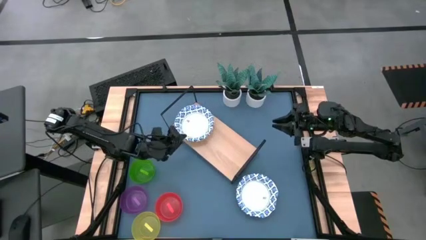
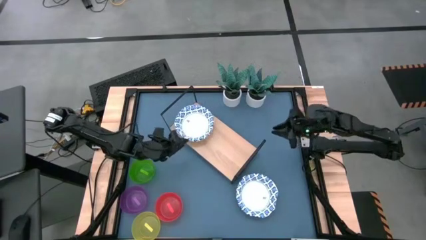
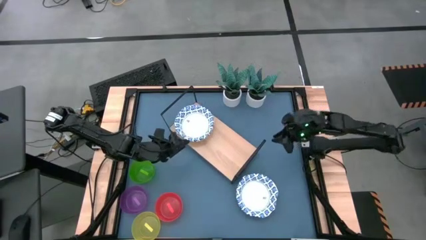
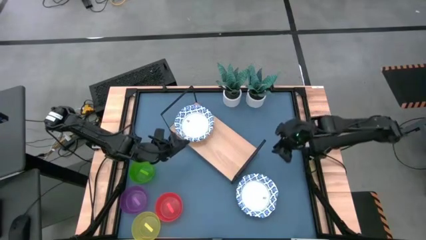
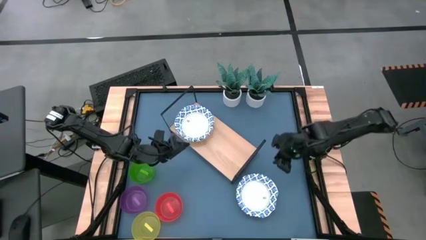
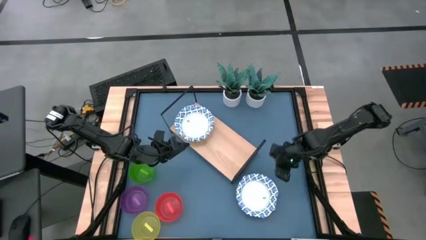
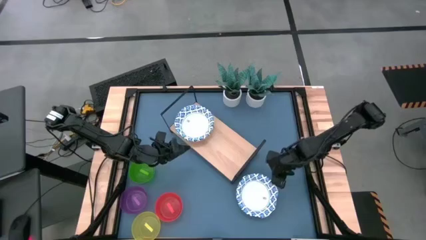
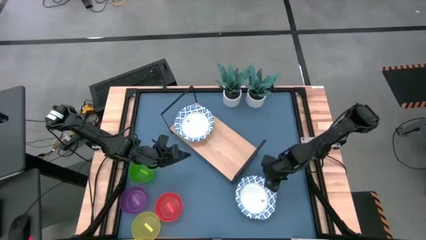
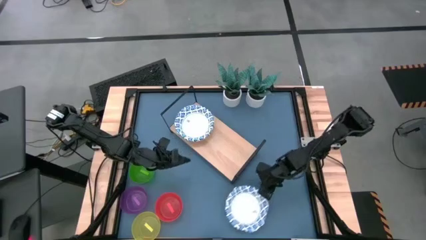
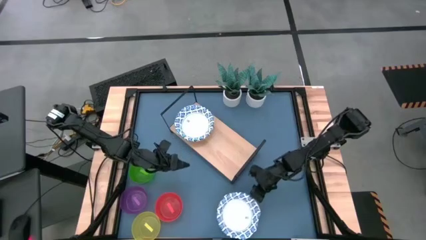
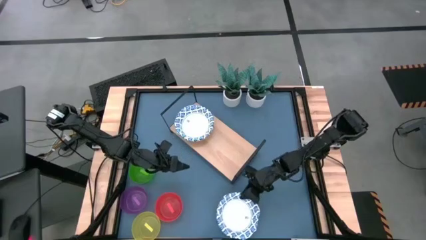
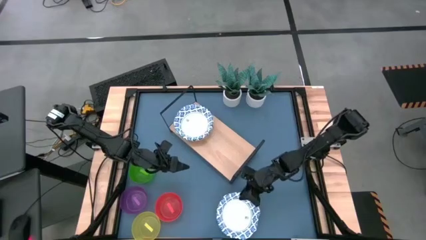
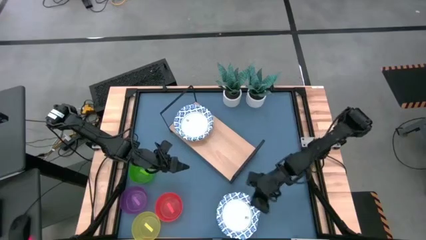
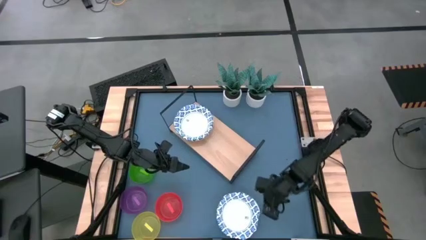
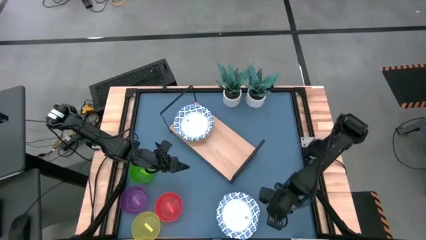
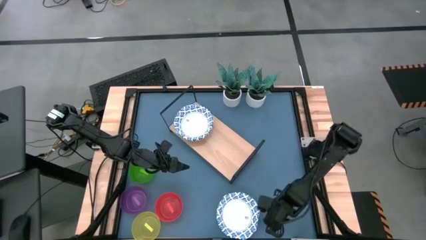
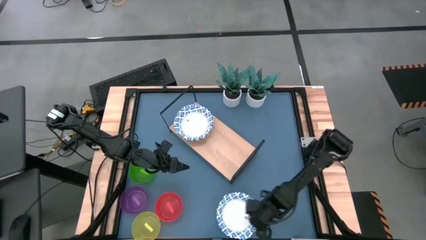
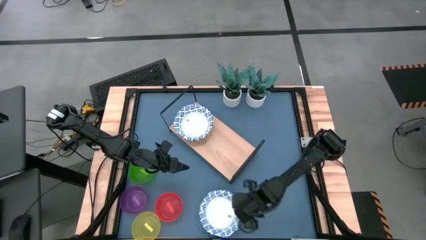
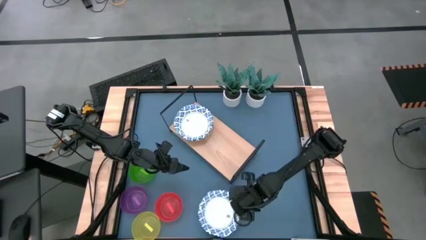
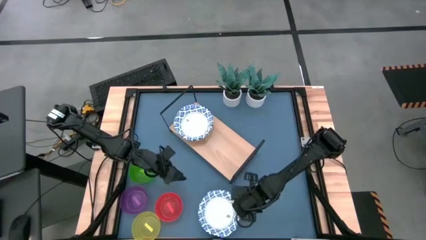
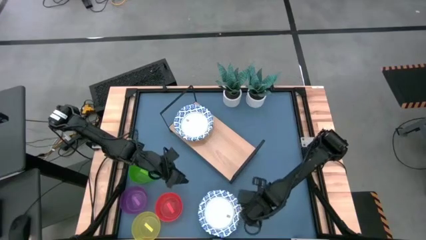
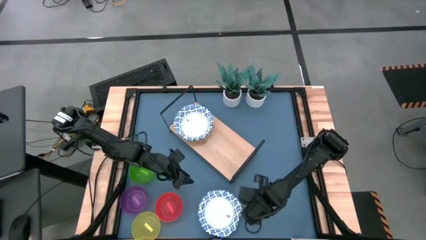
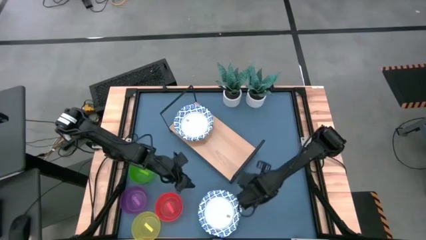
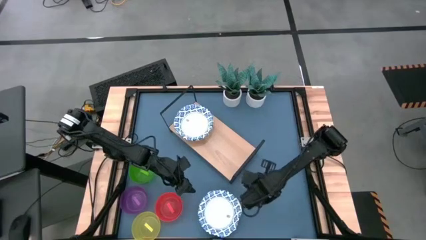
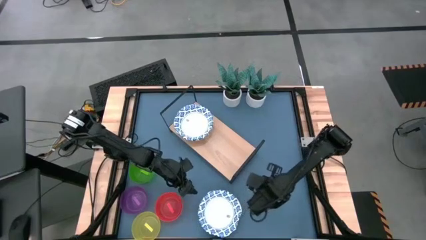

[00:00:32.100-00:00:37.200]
Task: Place and stack bowls onto a shelf
Move the blue bowl to the bottom middle of the table

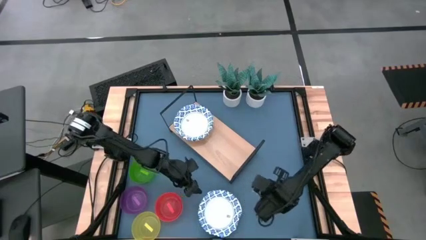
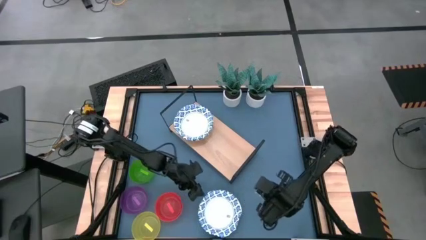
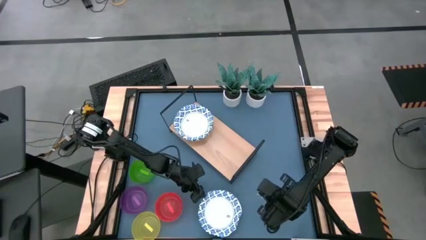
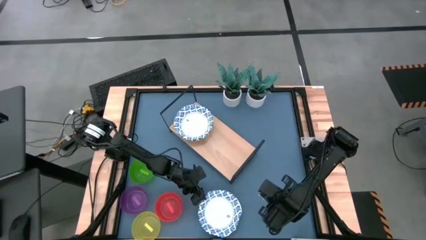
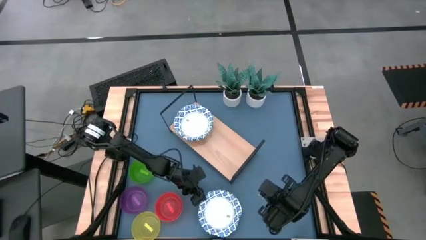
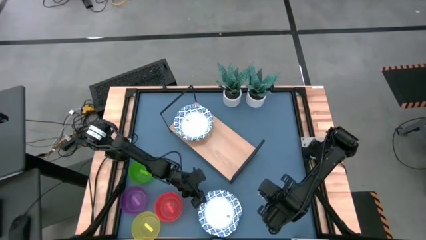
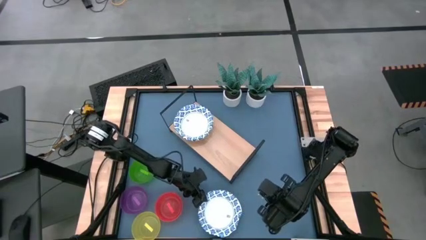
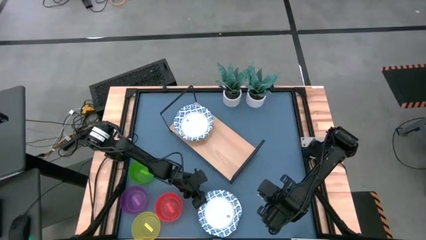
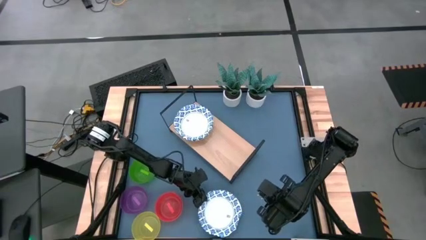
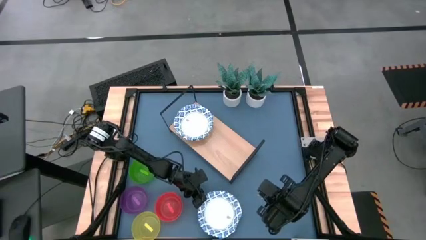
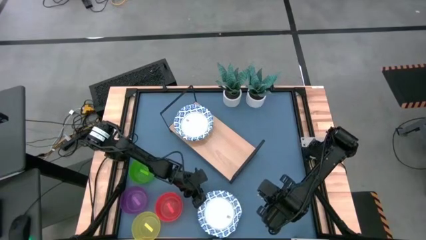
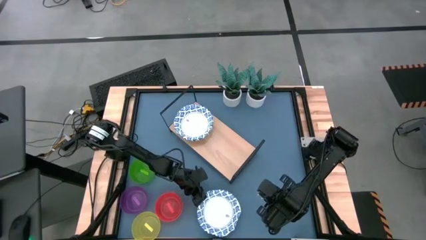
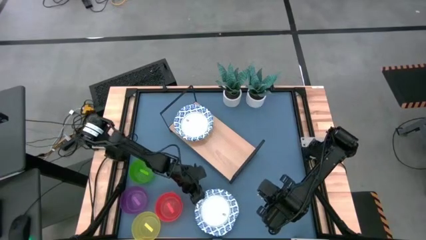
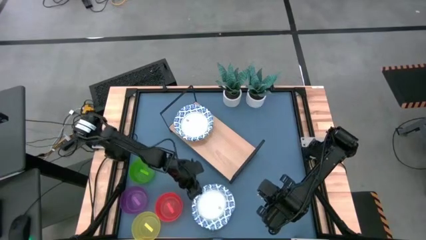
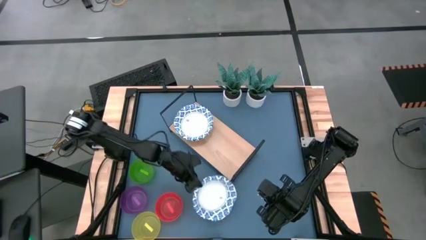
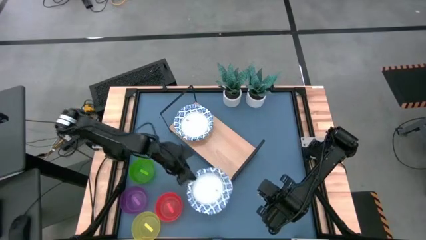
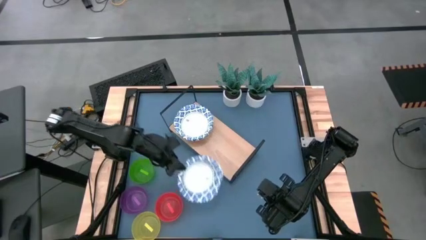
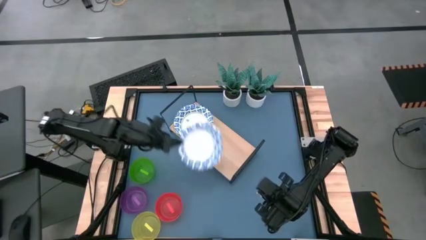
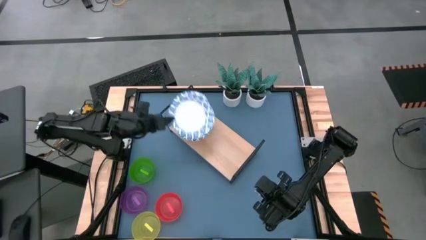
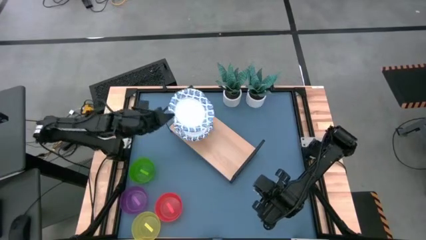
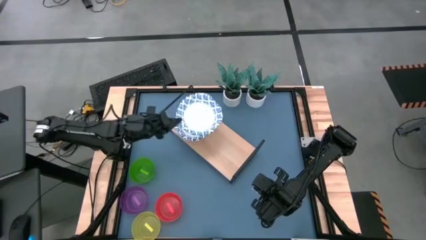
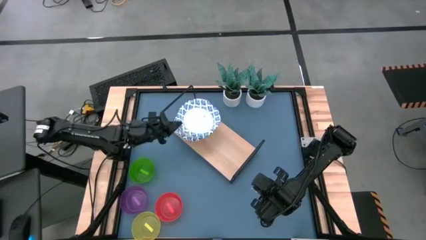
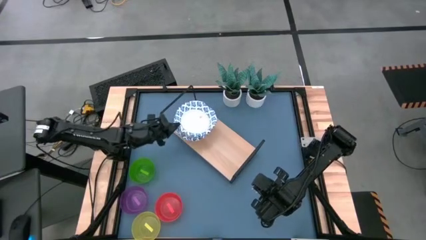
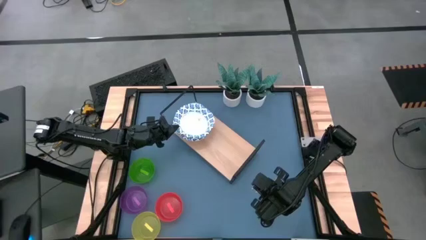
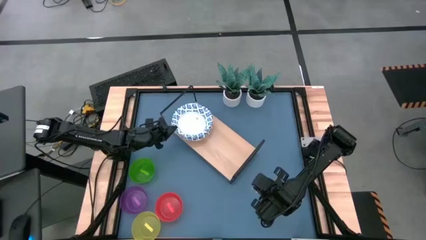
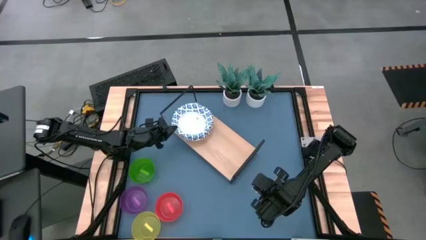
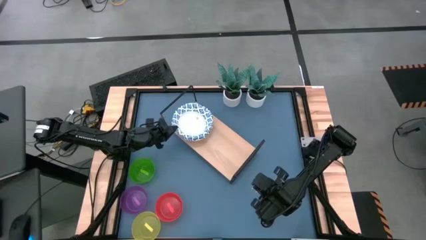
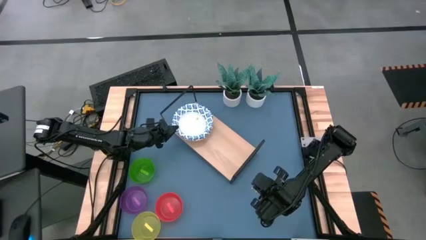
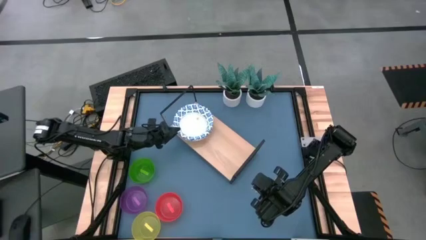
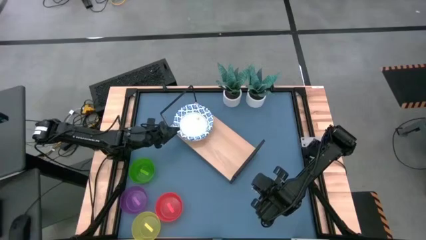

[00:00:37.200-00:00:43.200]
Stack the blue bowl on top of the blue bowl on the shelf

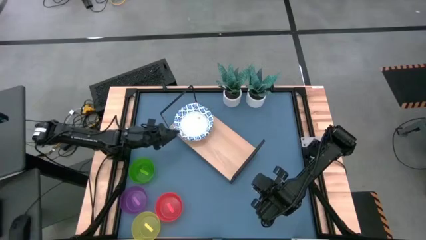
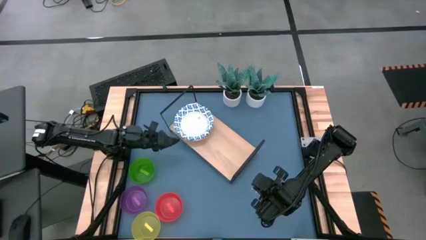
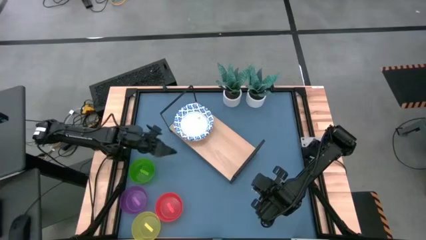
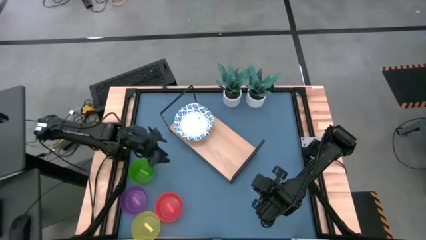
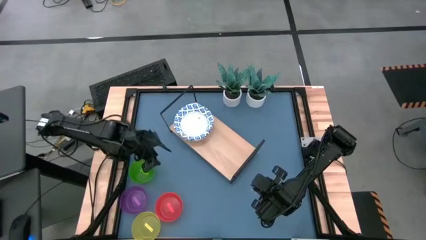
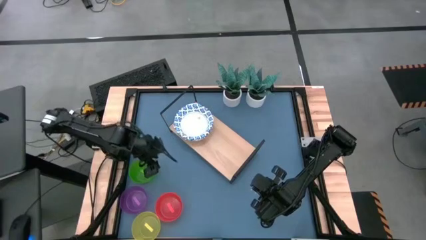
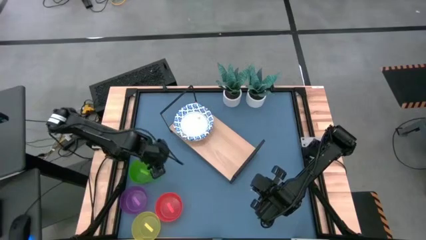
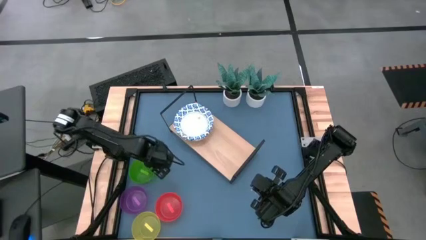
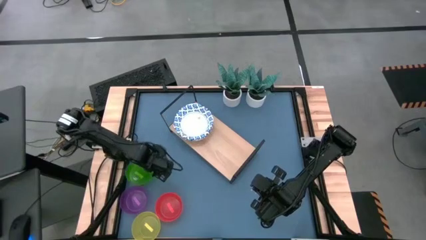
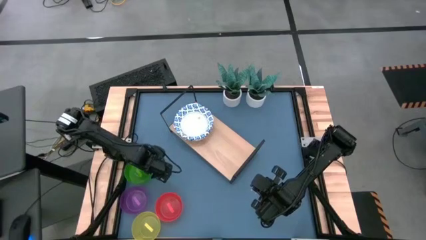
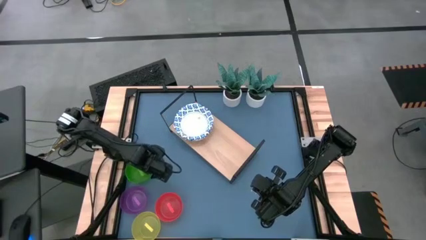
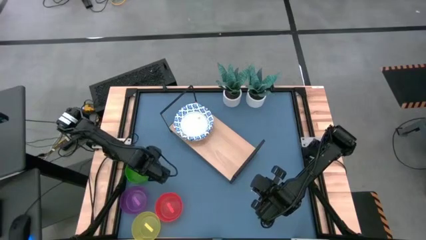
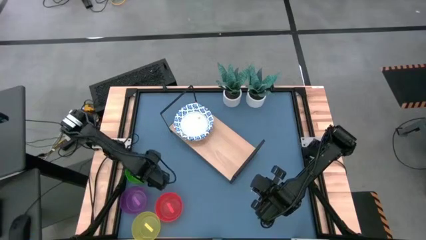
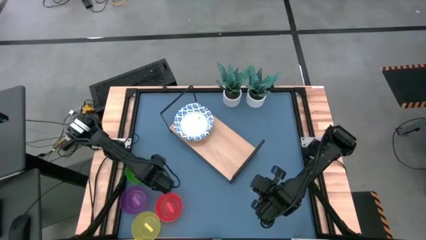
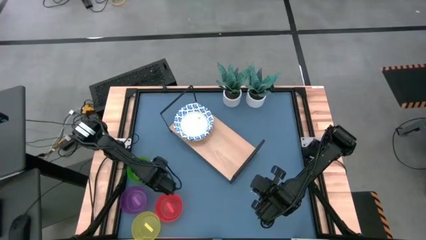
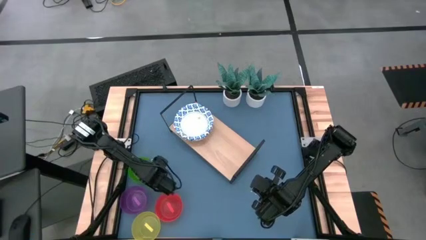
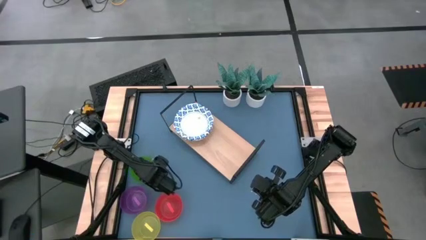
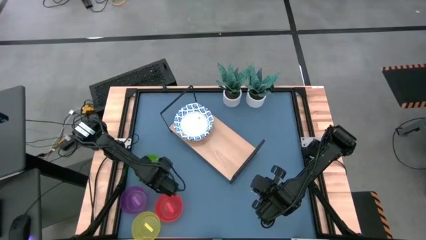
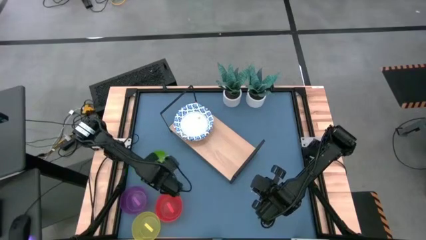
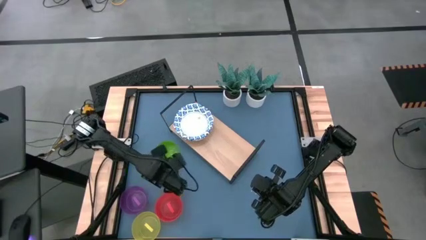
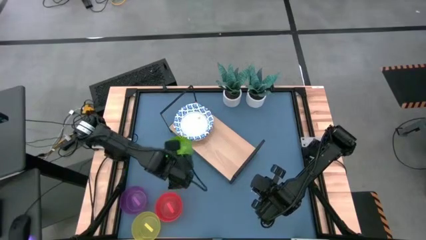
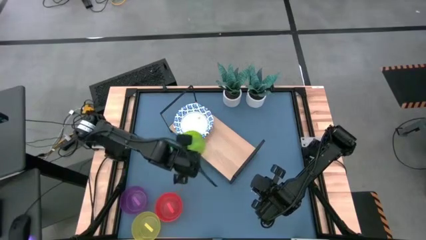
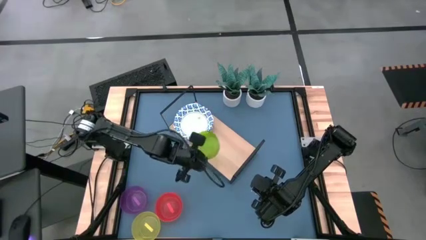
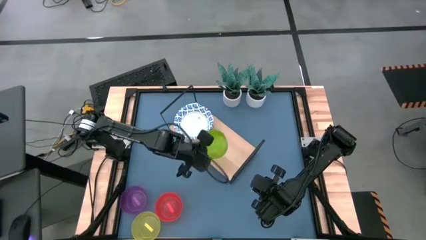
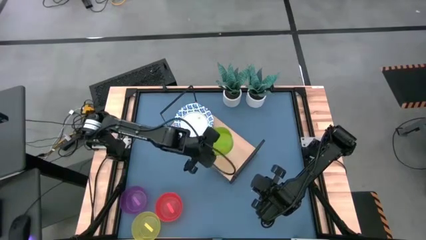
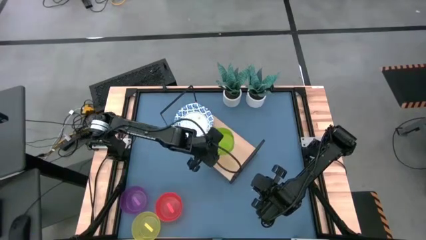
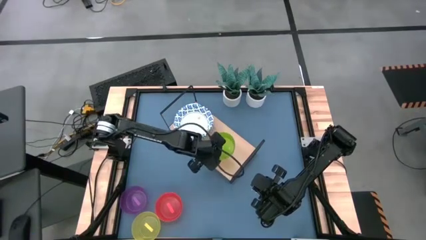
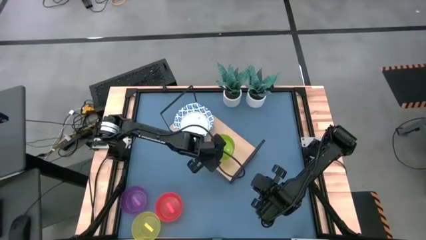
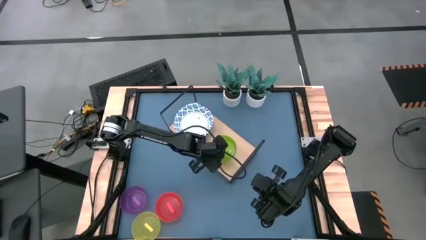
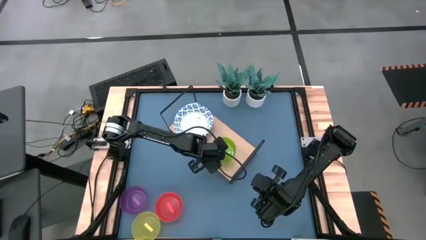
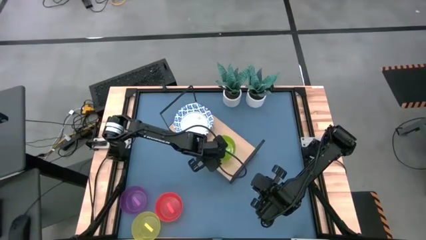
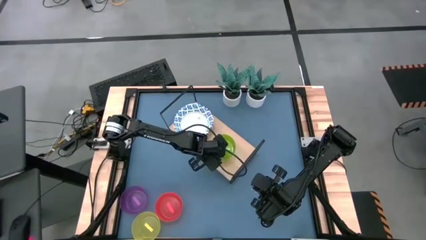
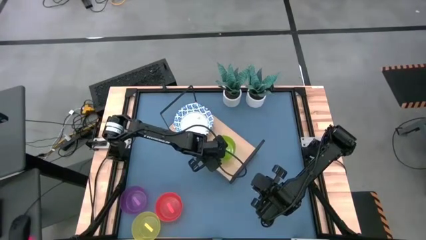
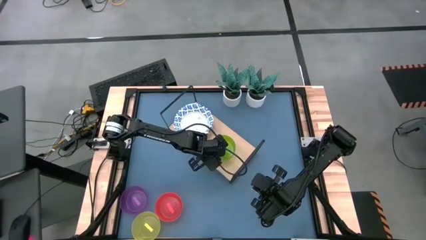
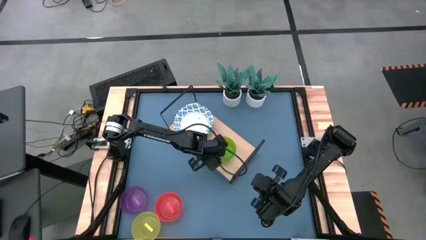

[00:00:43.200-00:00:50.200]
Put the green bowl on the shelf
